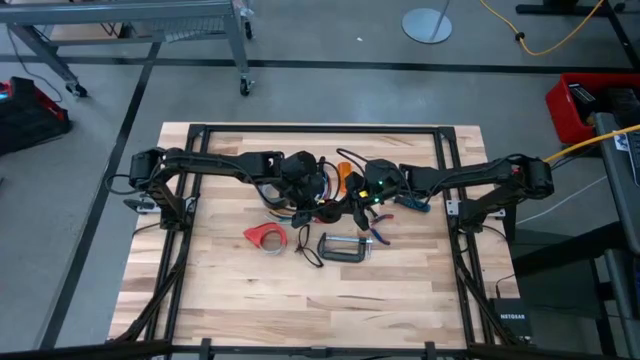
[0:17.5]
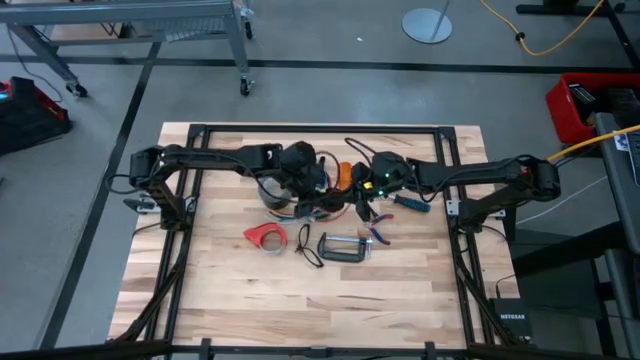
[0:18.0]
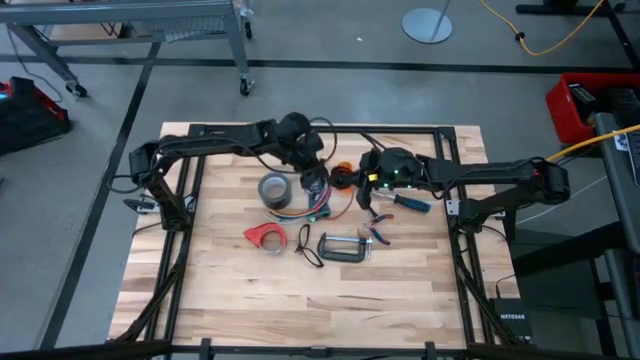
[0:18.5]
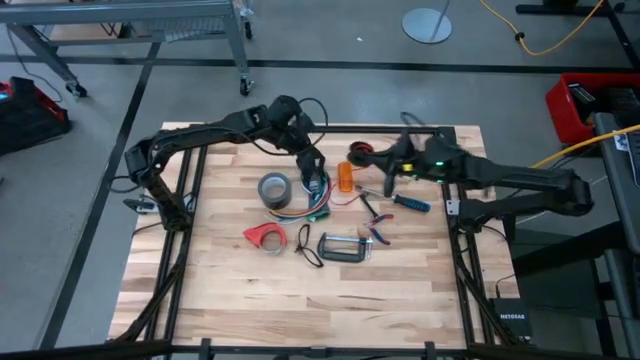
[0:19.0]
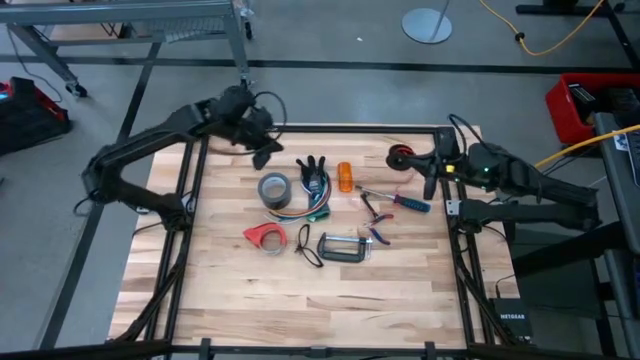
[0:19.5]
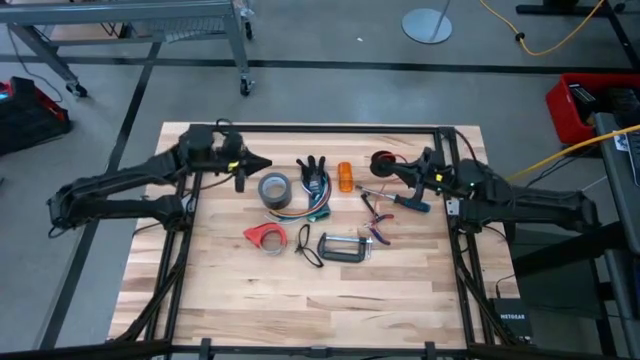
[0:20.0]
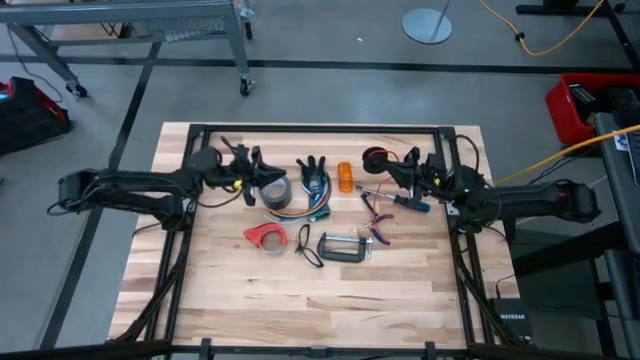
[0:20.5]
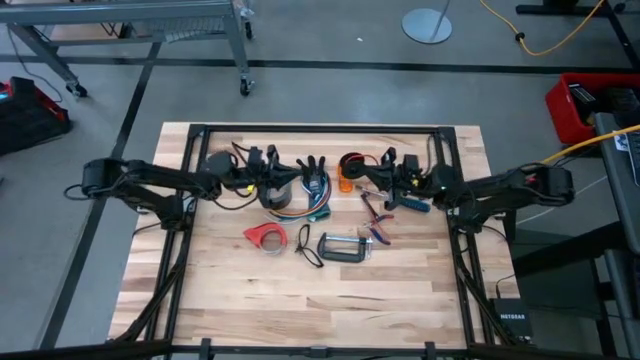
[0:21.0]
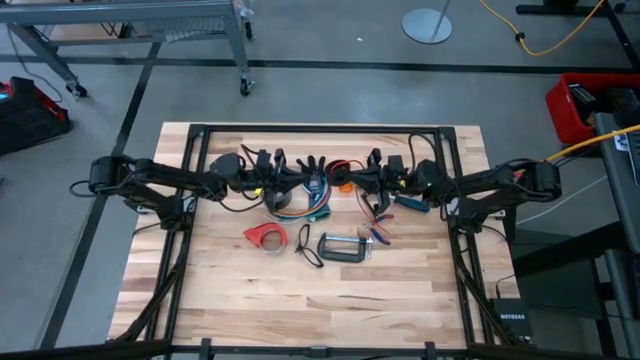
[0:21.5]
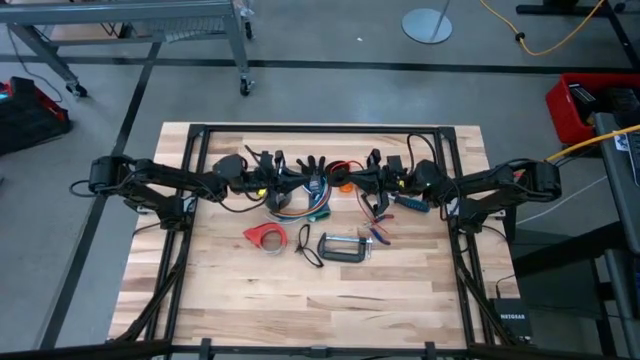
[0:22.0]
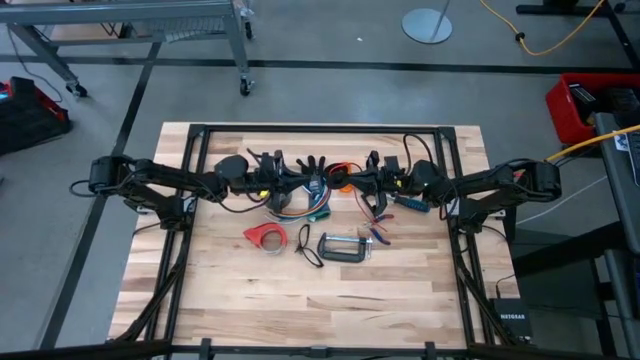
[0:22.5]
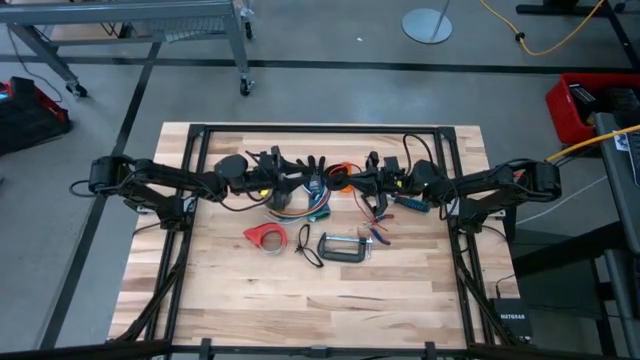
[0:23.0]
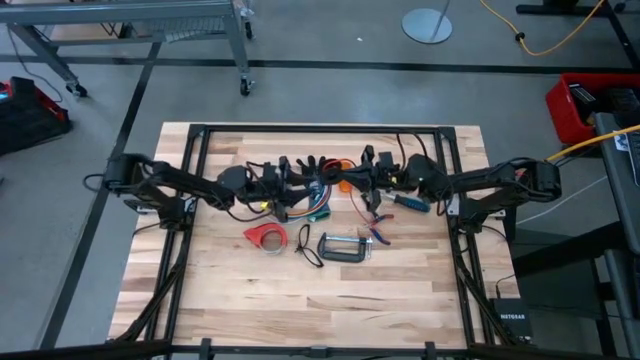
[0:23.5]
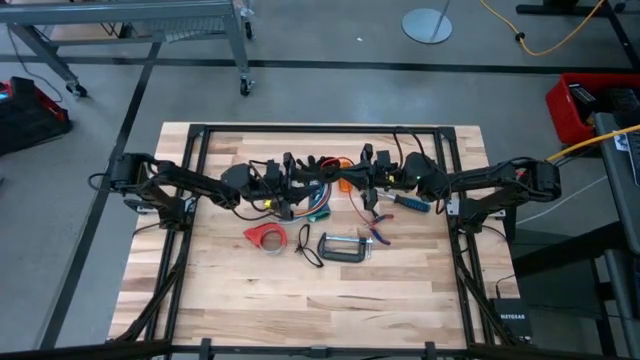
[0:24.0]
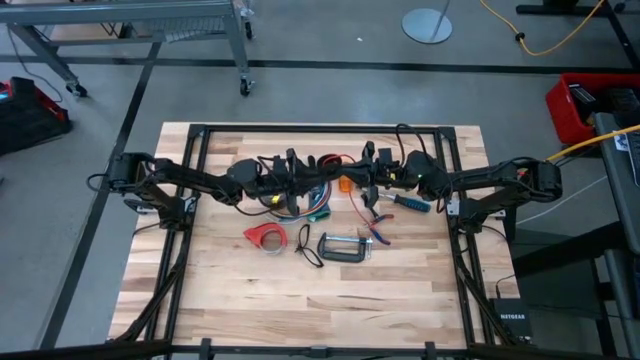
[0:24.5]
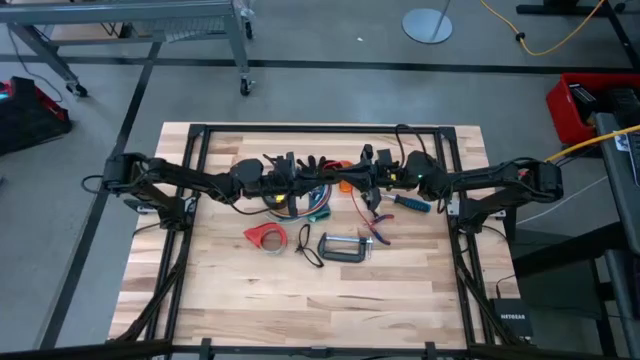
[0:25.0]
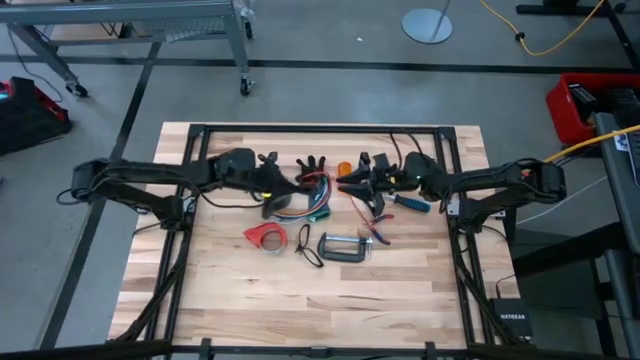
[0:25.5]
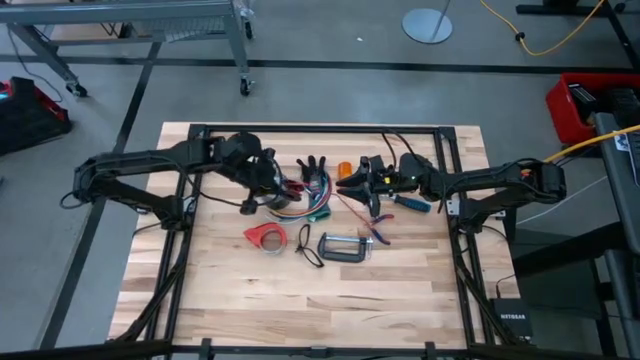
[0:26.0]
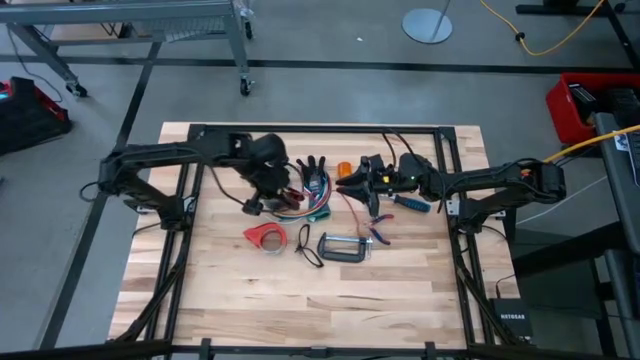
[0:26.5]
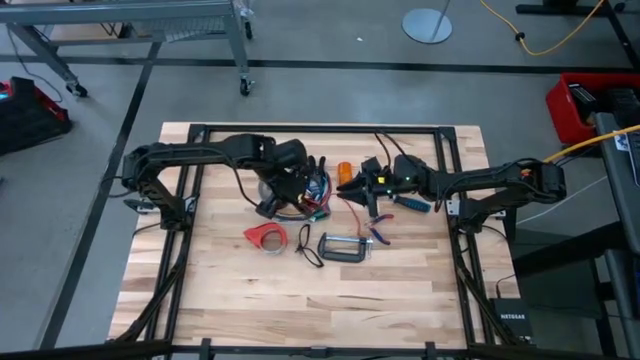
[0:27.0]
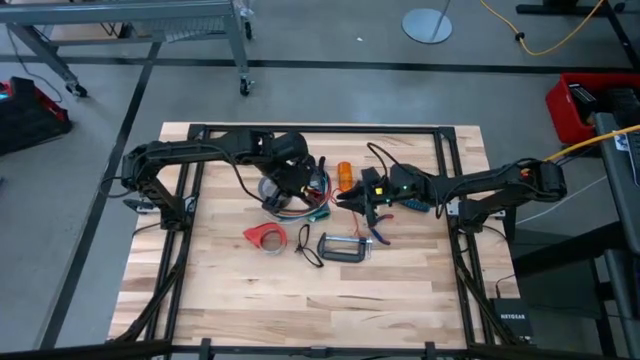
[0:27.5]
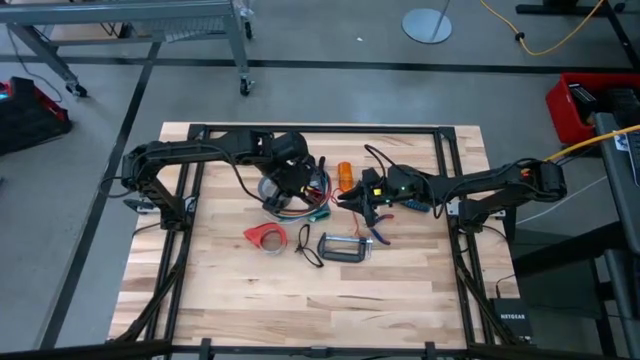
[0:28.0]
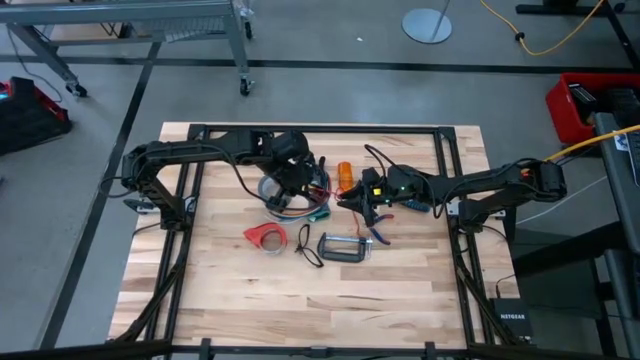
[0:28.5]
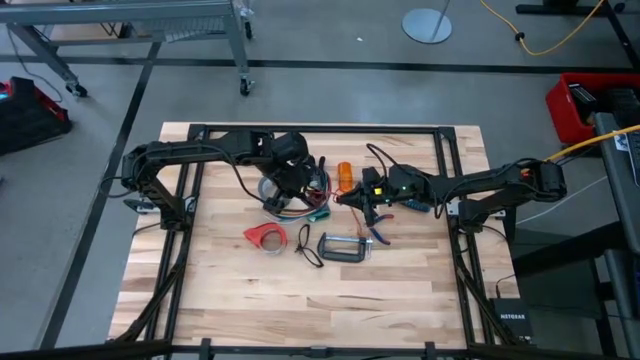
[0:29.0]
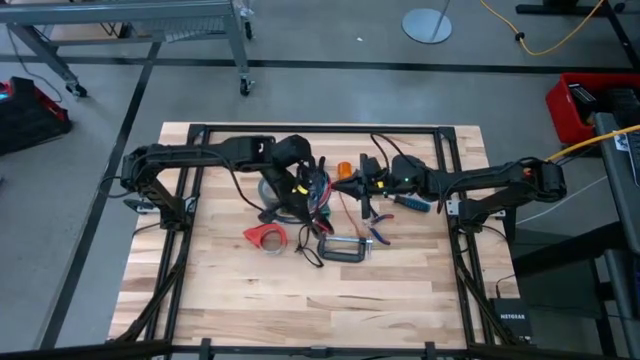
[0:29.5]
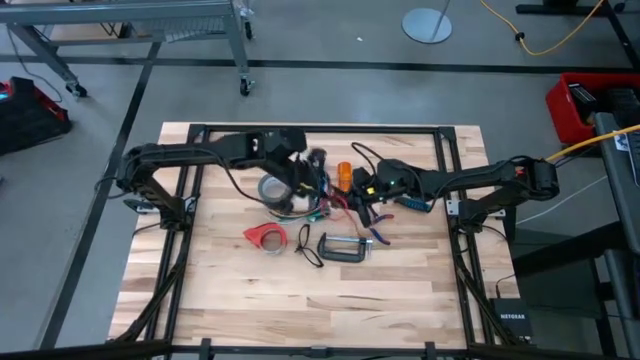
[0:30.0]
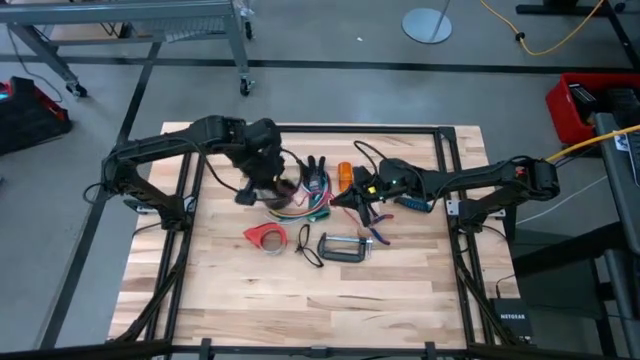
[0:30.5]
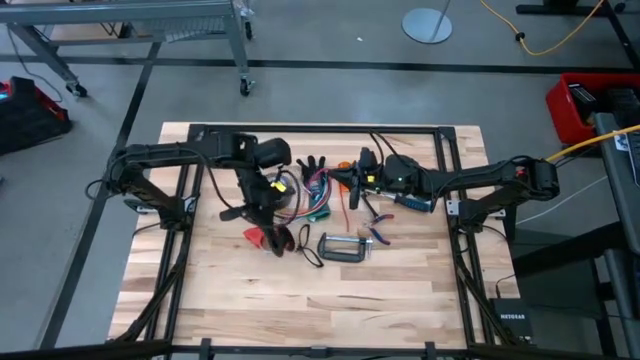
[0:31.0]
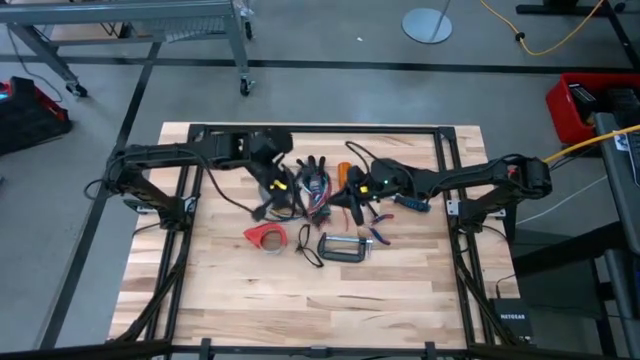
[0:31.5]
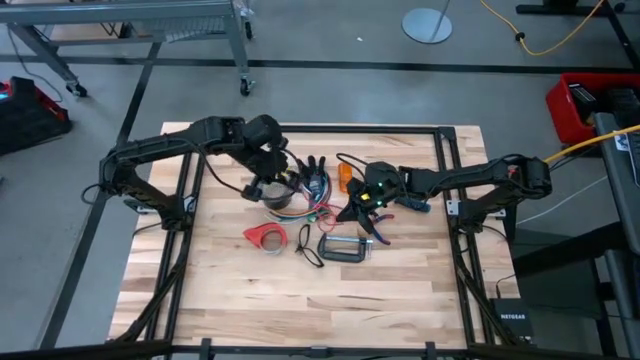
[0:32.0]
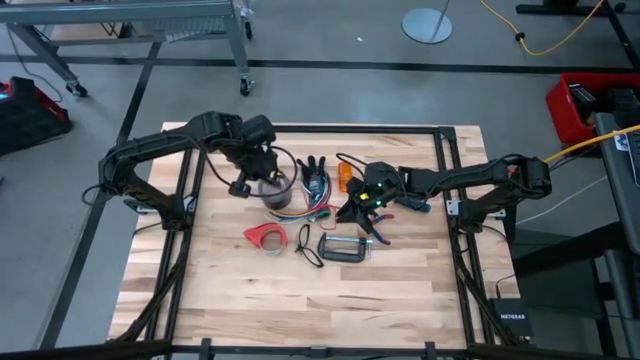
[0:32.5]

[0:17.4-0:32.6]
Task: Coil cords
Uncoil the wire from the spool

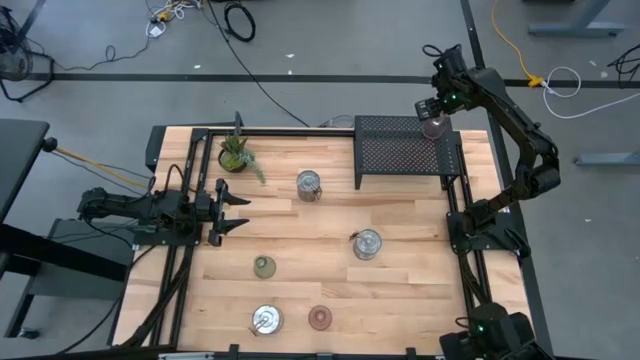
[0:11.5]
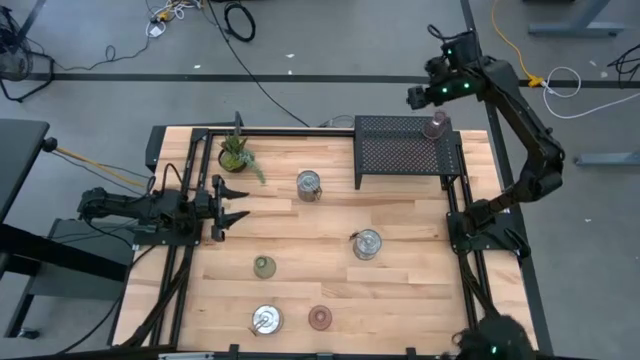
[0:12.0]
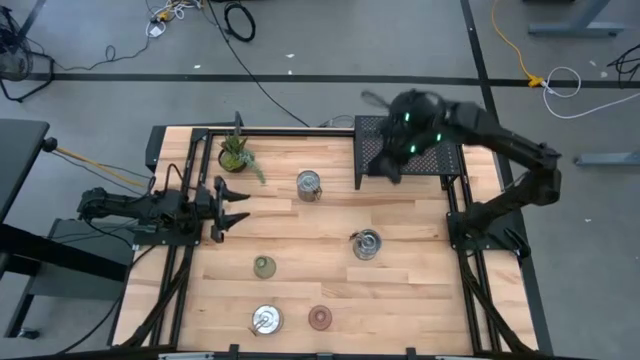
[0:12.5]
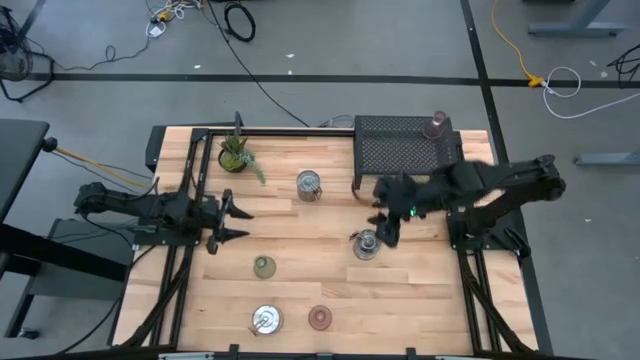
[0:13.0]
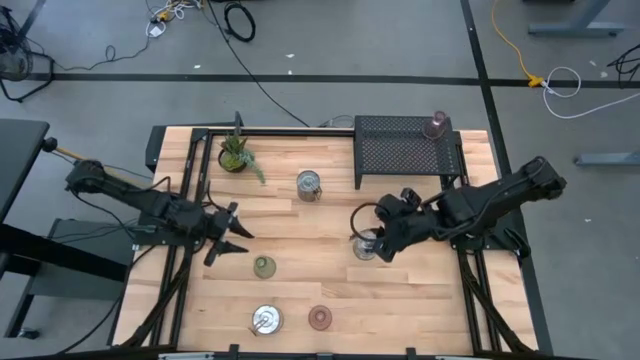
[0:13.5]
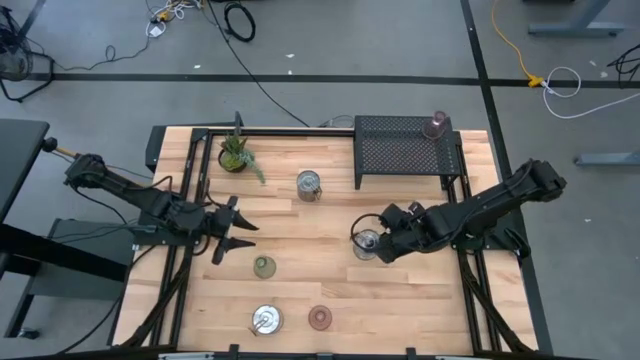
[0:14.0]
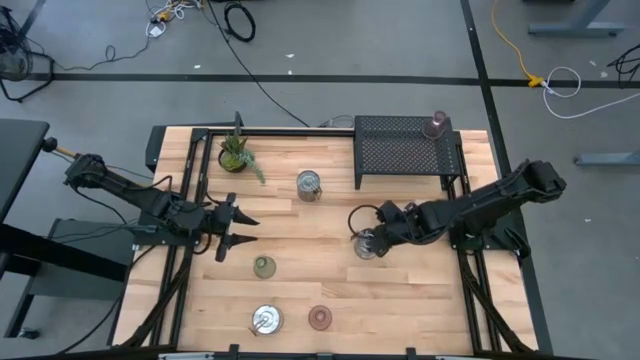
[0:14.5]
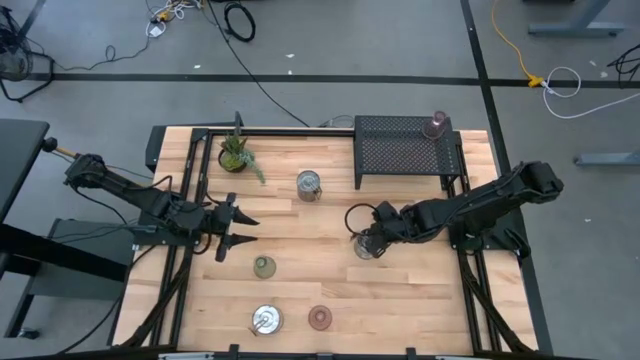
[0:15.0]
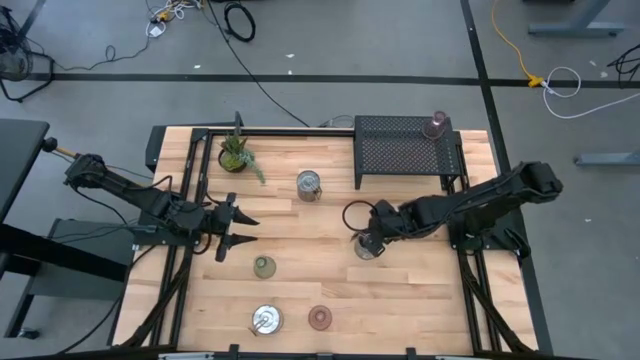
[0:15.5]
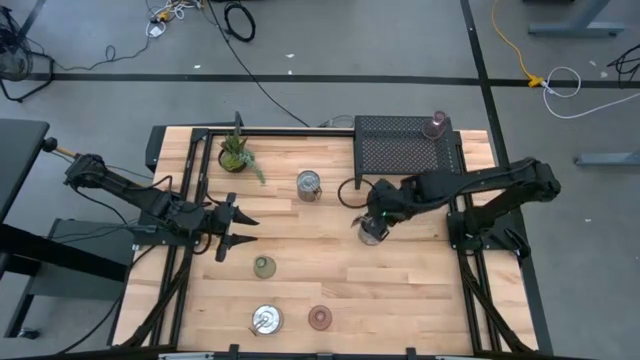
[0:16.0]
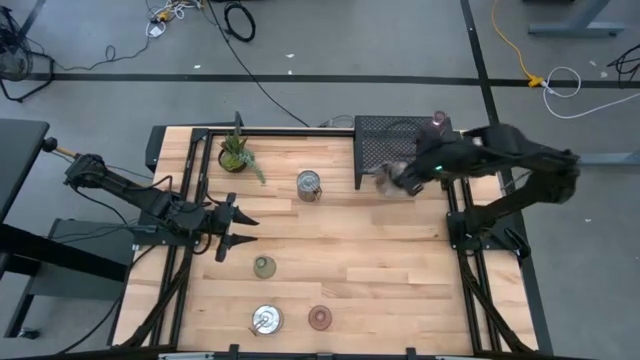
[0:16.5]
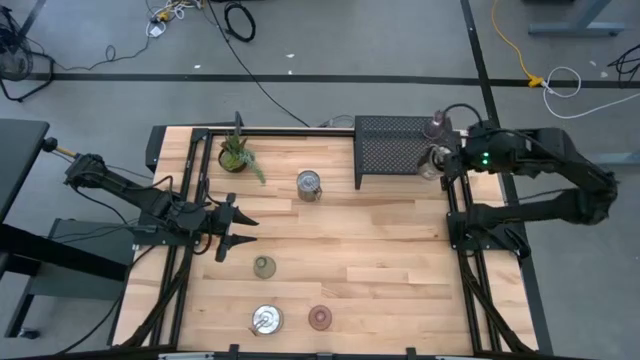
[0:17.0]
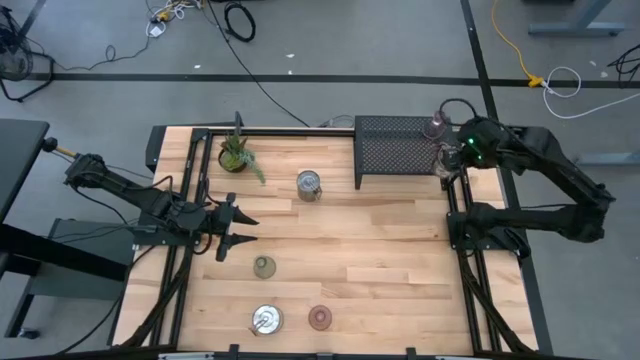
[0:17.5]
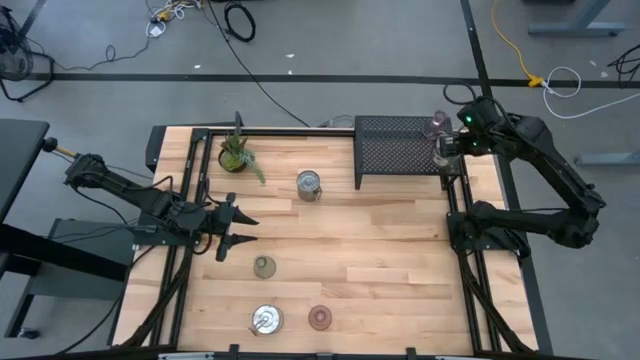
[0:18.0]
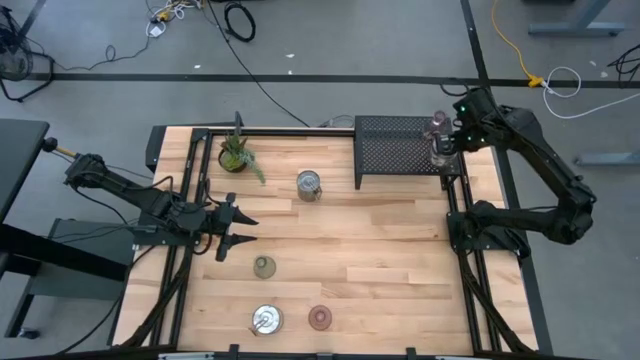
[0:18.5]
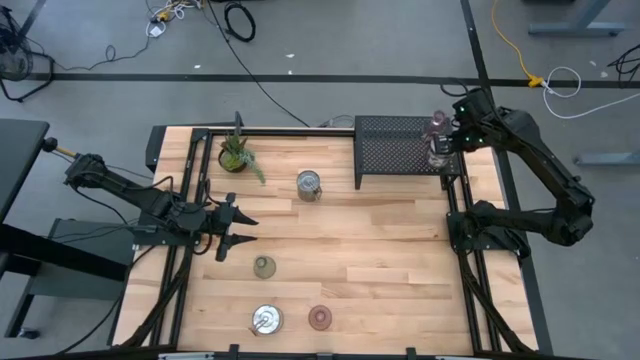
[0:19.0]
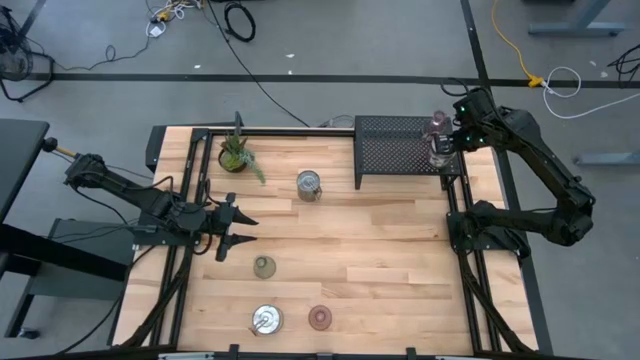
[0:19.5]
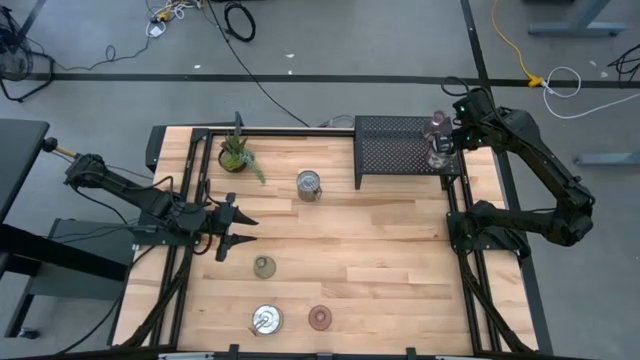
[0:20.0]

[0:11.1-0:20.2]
Task: Pick & Place candle stick holders
Put the bottom brown scented candle on the shelf
